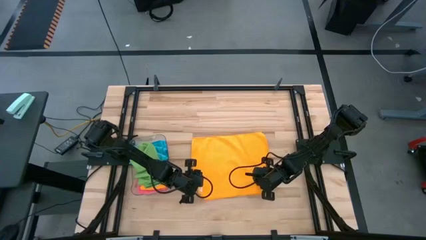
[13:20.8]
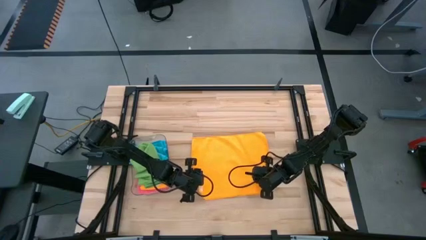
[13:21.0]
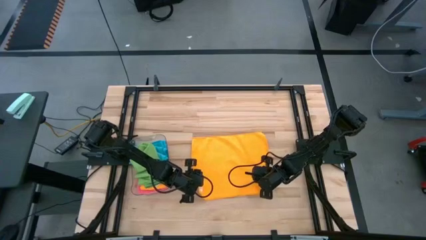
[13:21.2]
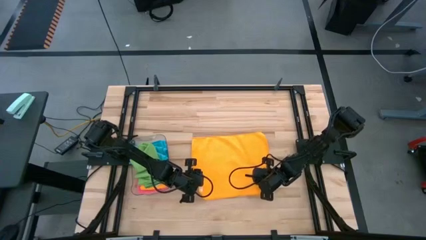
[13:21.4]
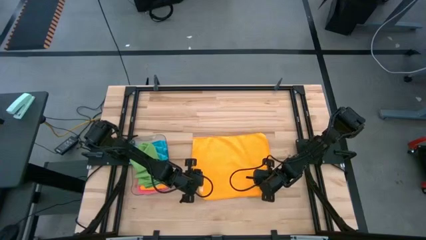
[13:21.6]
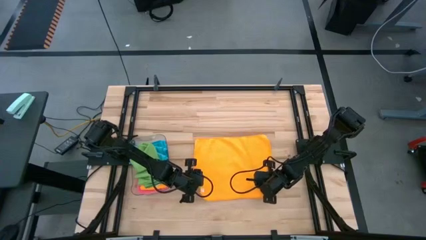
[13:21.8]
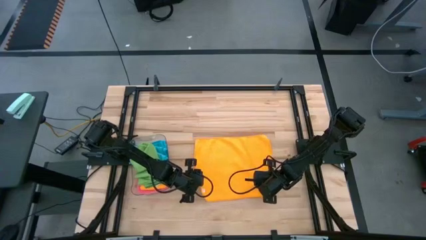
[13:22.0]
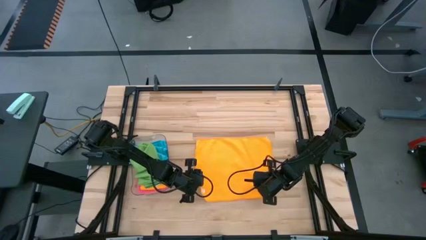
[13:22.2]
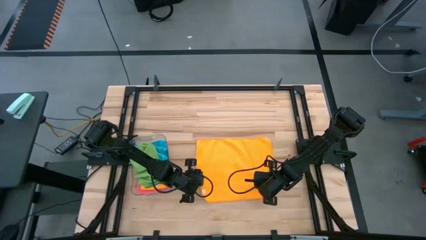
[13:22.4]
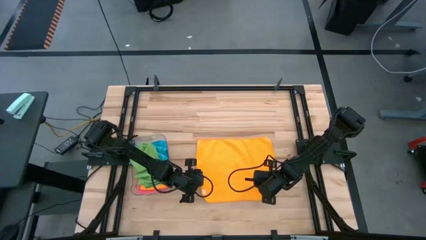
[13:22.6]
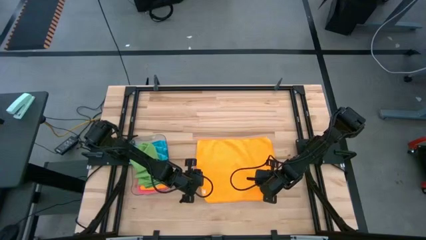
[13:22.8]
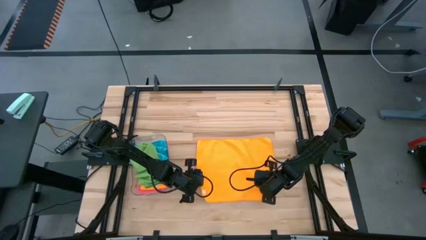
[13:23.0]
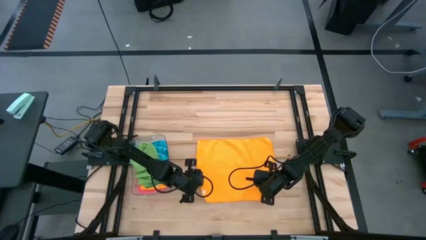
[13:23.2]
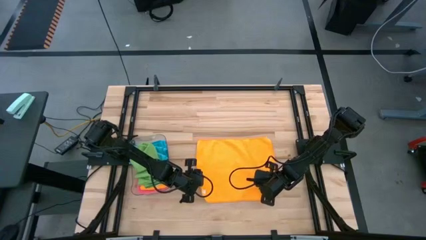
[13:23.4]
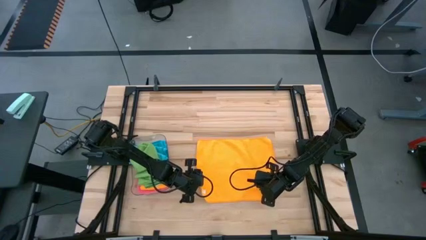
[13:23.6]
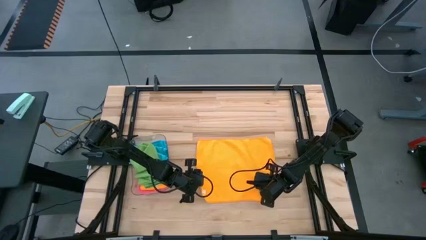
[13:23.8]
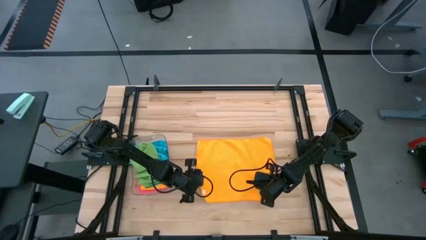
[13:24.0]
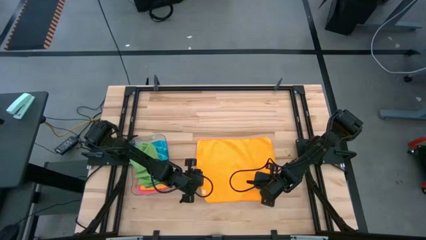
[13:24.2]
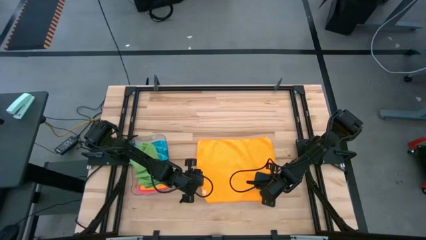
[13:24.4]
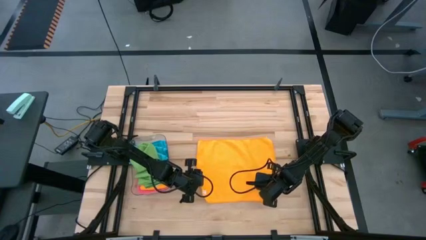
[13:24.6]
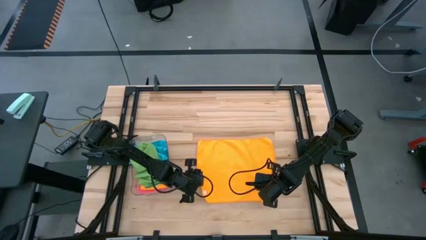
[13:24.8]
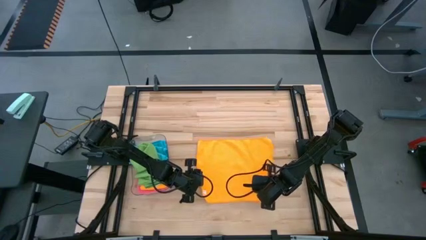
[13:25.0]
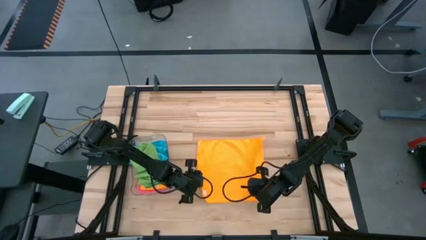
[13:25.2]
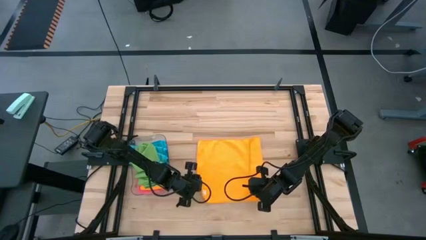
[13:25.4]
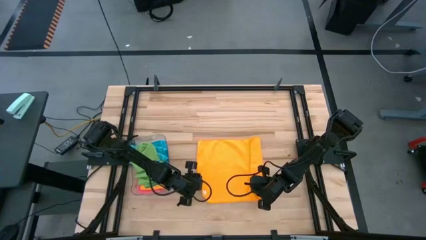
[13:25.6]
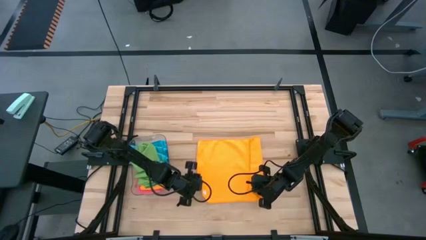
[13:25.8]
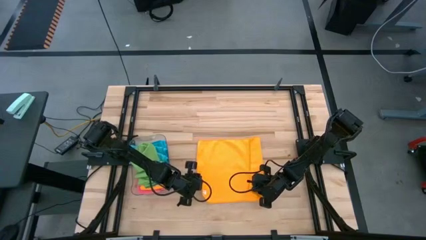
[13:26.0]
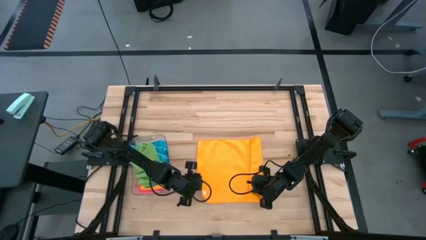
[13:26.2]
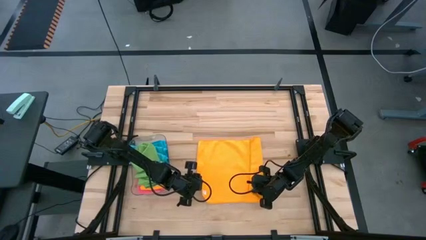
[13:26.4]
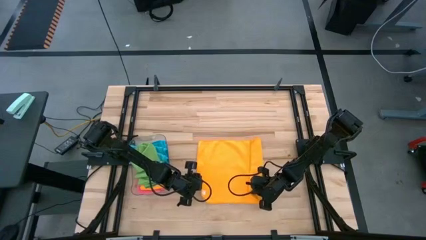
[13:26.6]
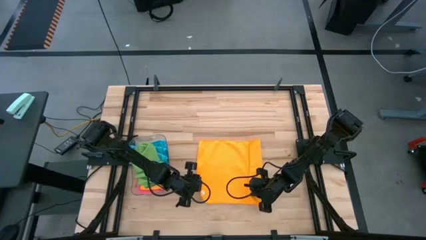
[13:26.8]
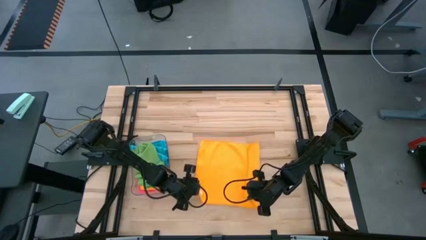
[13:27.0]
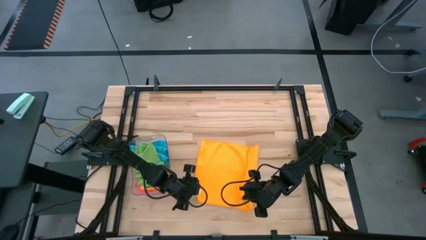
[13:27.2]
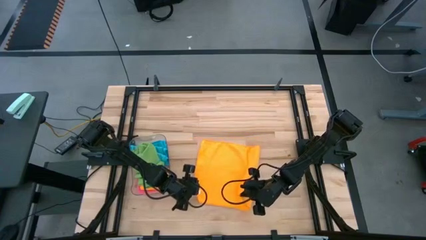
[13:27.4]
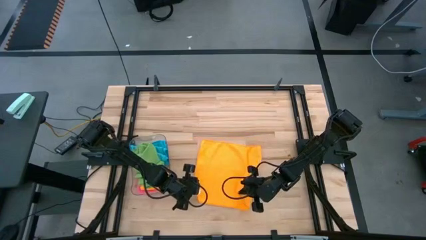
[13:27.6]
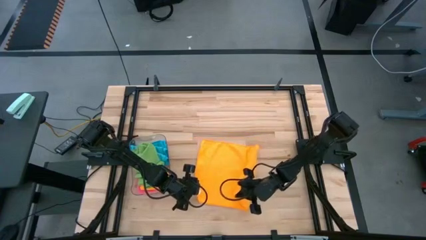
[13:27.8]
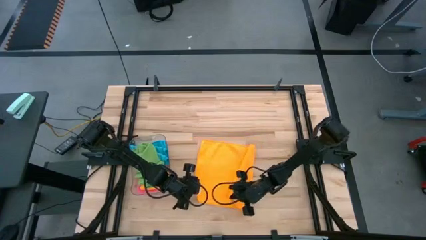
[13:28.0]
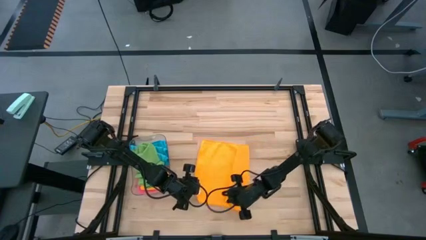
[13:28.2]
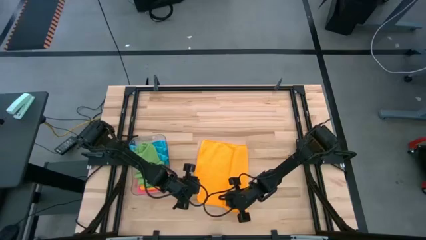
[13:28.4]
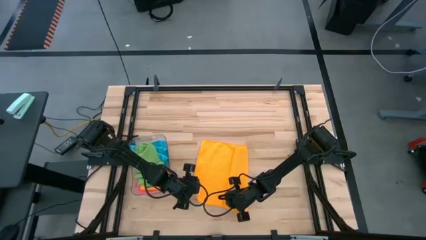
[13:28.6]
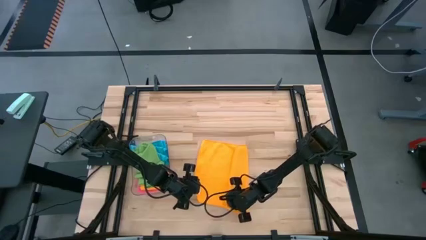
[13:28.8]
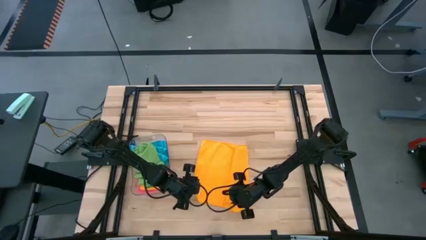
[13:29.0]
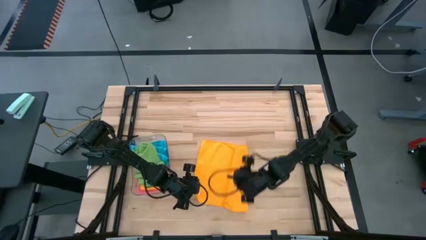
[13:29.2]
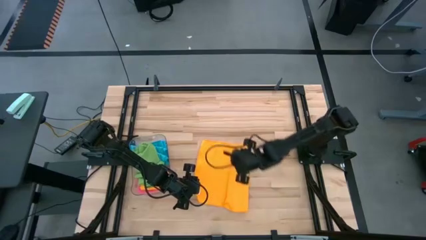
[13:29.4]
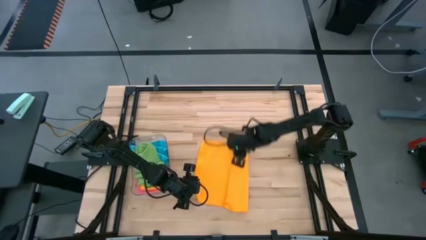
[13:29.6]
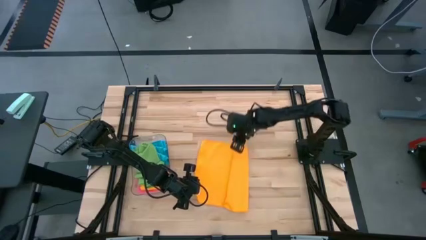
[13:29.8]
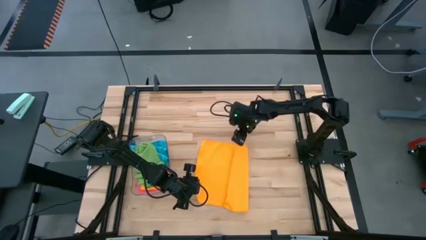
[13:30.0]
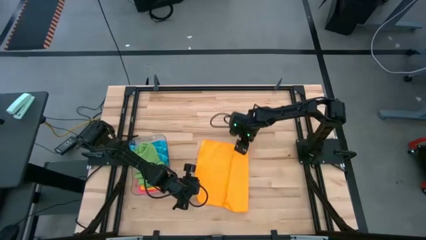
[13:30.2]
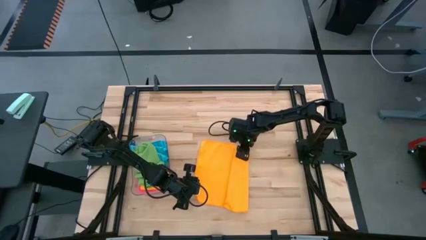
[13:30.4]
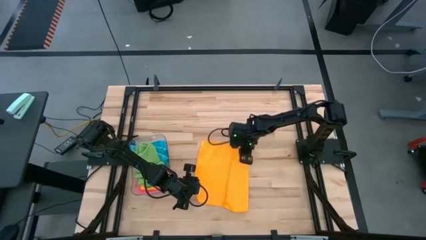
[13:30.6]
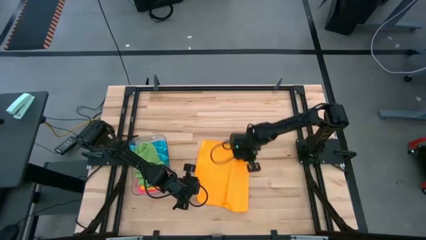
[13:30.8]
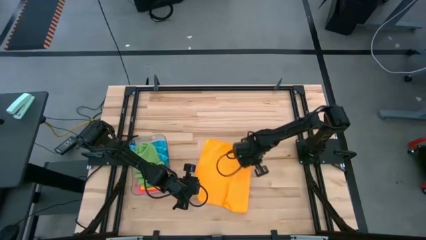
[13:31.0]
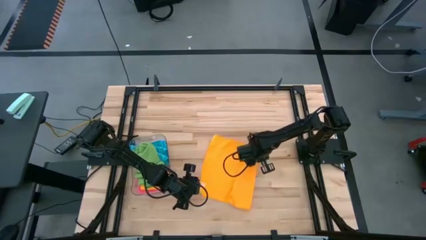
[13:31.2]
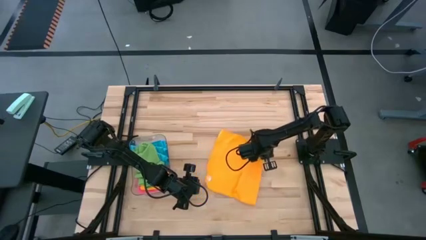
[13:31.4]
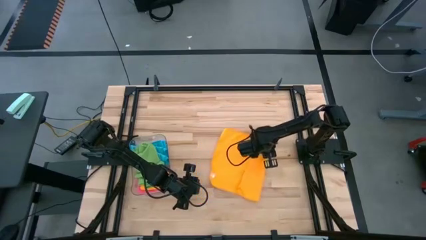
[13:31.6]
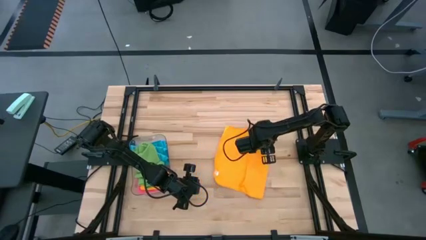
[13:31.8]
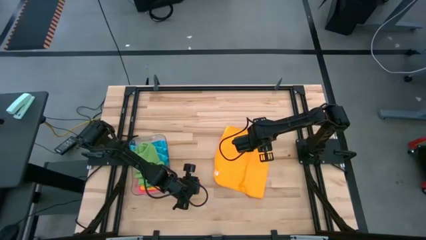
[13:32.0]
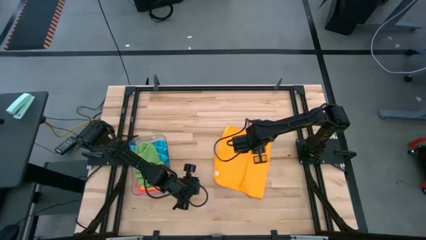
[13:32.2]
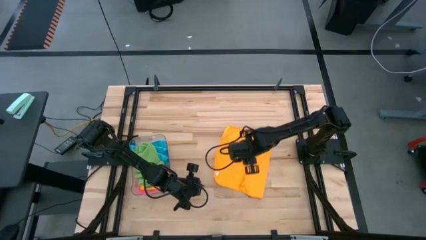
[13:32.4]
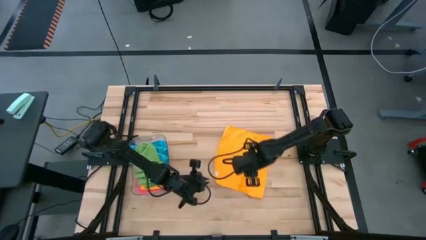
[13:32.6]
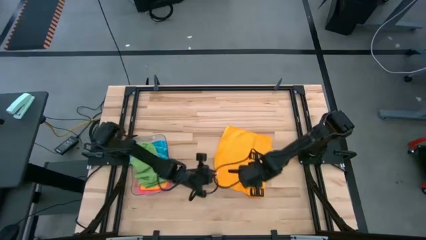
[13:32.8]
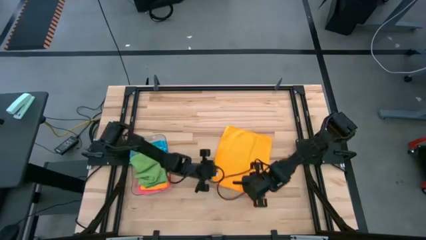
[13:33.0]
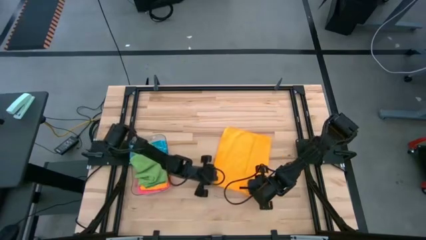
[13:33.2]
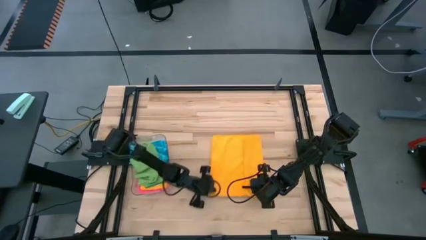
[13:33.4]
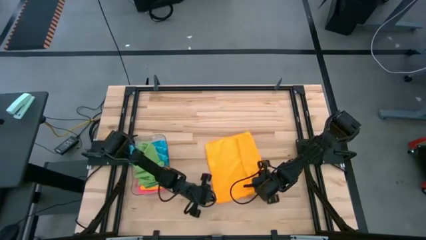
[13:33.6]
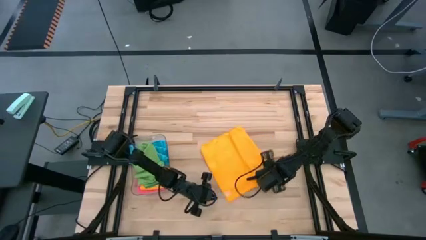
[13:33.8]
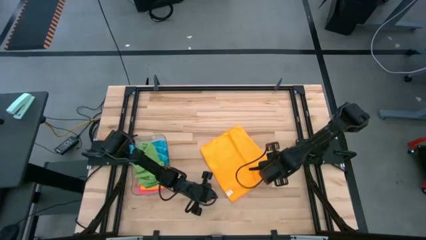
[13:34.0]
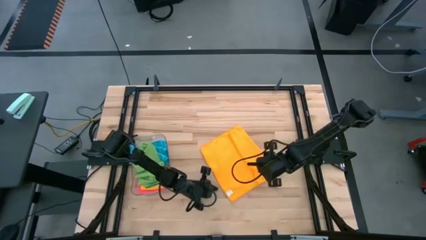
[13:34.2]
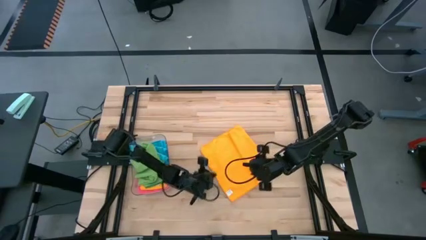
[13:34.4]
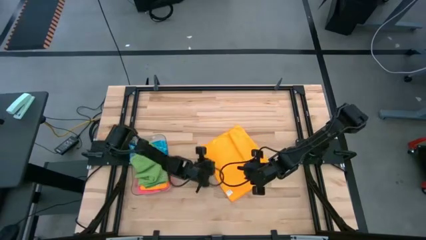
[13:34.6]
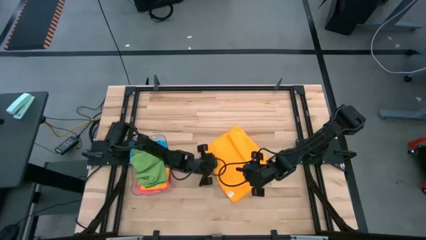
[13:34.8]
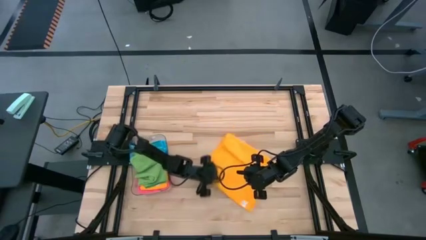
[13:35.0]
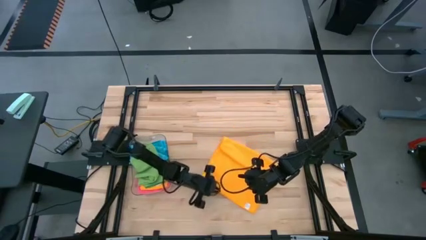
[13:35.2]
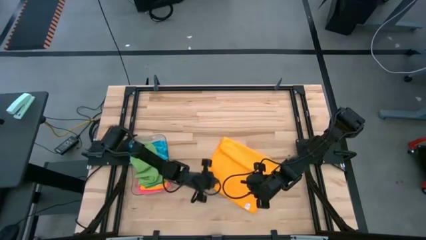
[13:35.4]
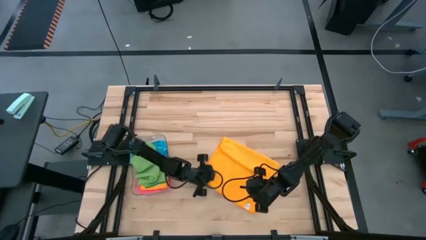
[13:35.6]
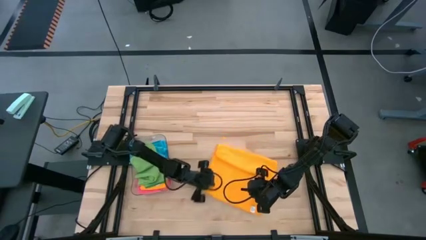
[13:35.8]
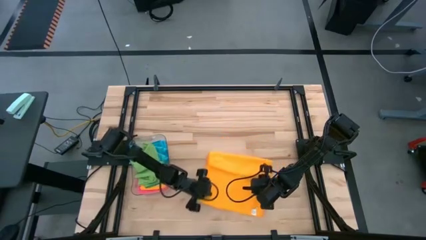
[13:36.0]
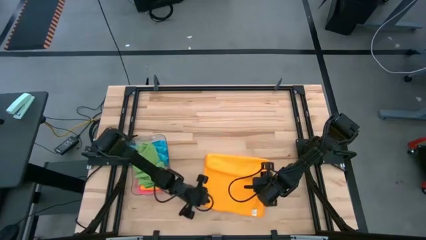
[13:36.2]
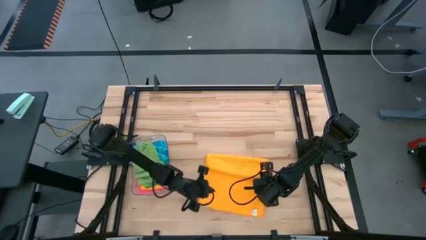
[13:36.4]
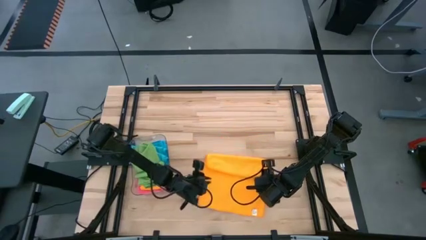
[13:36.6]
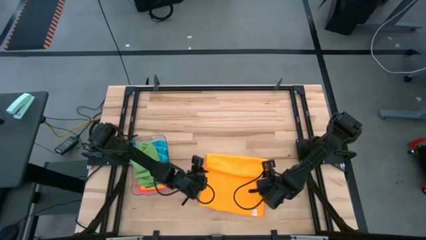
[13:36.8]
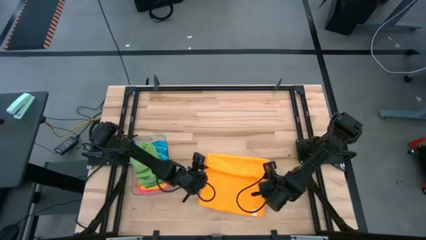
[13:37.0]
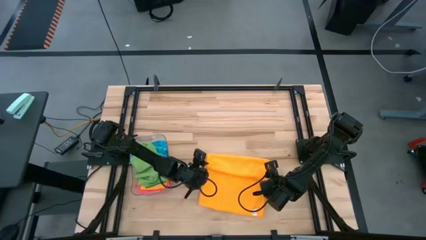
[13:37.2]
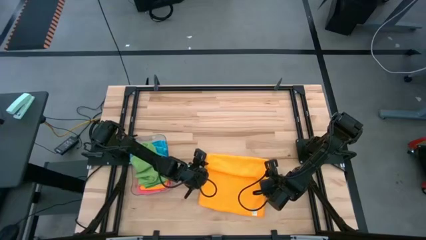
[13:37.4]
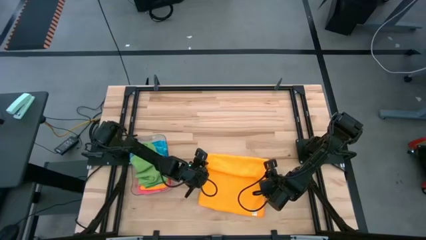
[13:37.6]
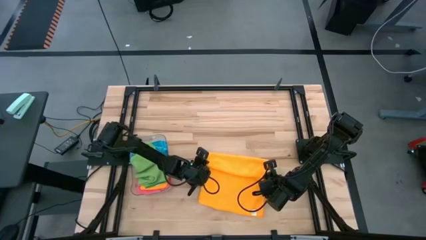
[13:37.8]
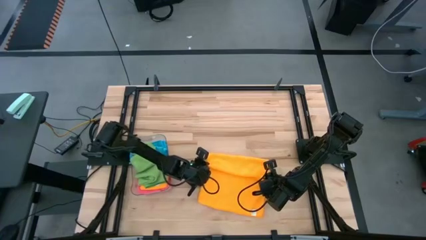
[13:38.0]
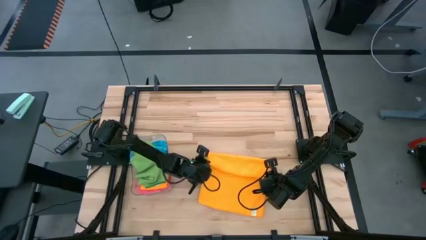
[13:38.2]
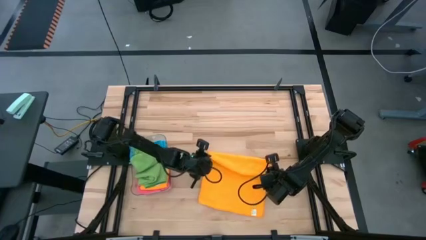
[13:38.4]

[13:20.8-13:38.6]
Task: Fold microfiber towels
Fold the yellow microfiber cloth
